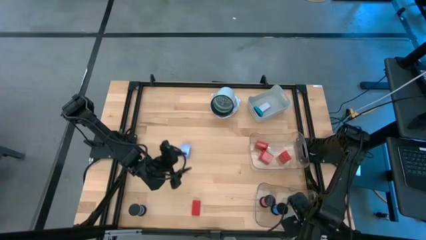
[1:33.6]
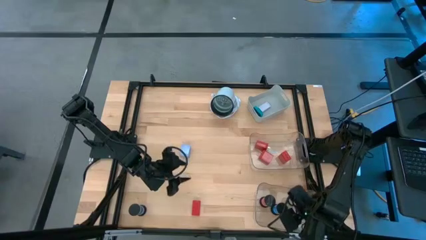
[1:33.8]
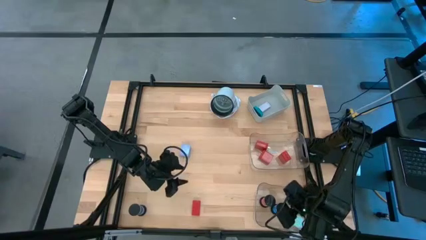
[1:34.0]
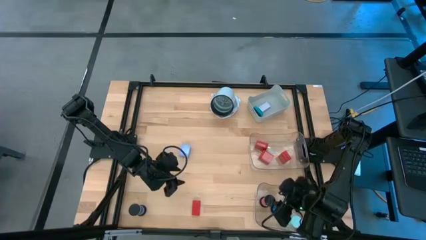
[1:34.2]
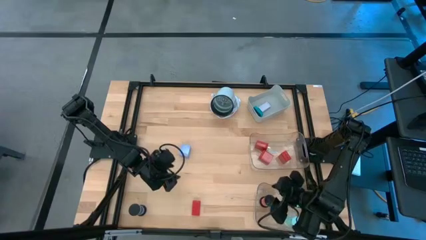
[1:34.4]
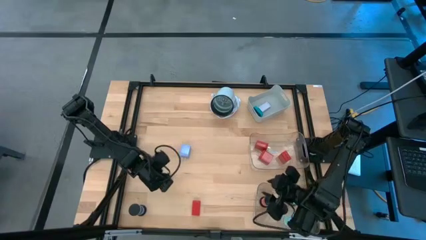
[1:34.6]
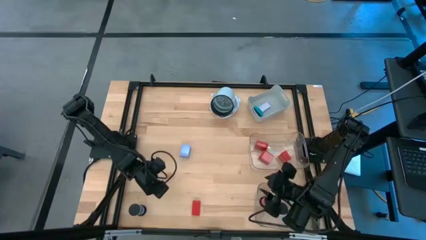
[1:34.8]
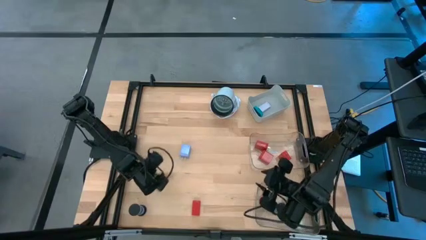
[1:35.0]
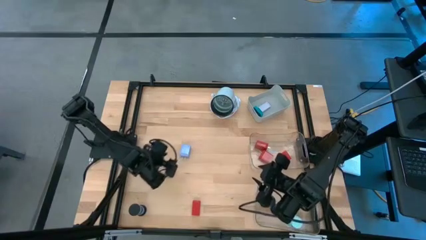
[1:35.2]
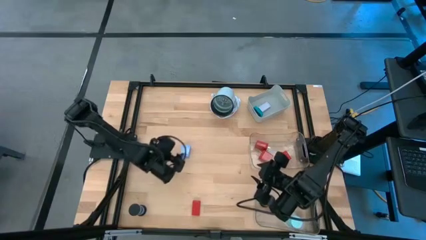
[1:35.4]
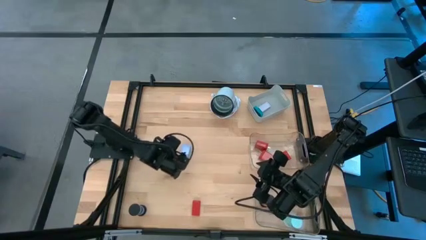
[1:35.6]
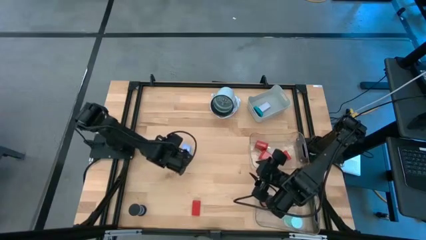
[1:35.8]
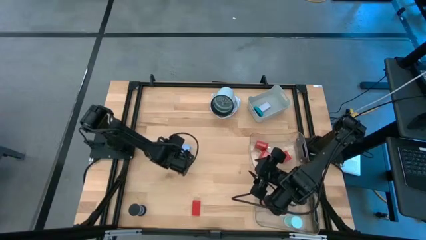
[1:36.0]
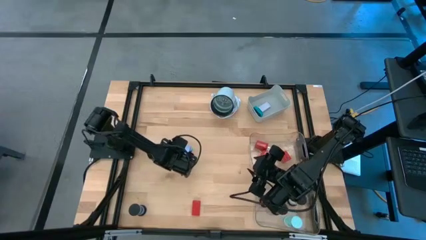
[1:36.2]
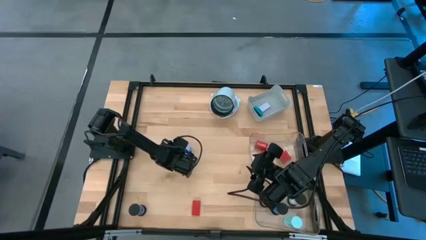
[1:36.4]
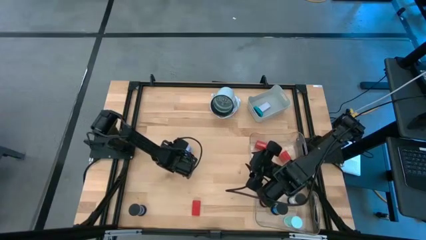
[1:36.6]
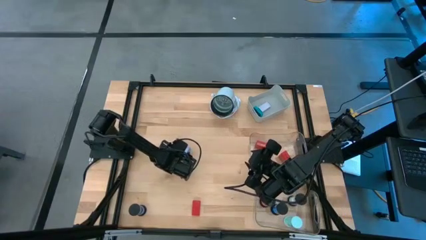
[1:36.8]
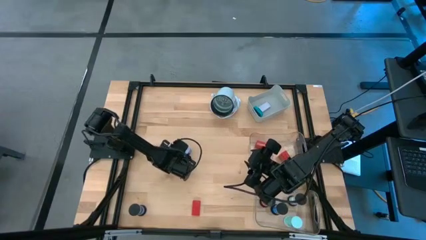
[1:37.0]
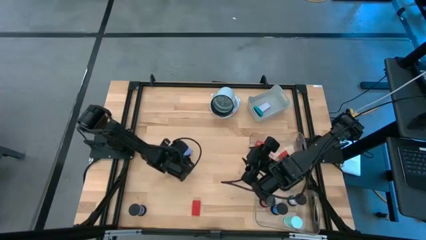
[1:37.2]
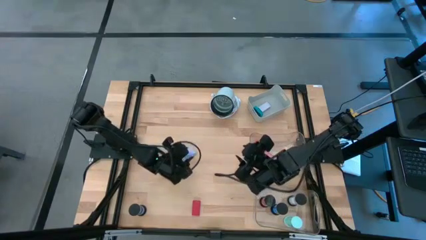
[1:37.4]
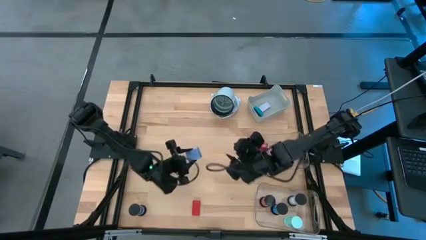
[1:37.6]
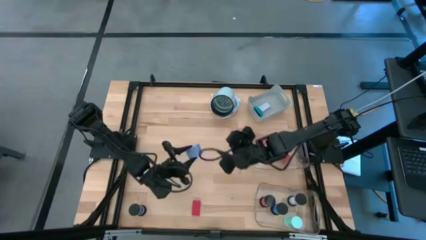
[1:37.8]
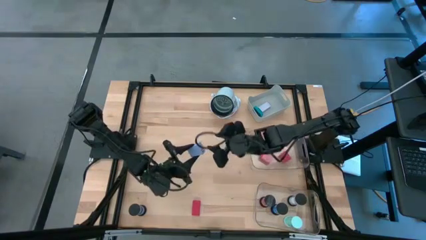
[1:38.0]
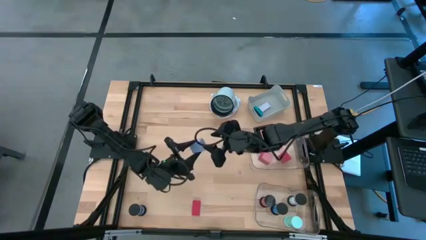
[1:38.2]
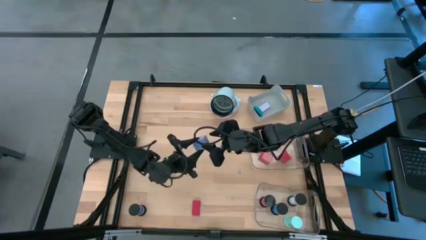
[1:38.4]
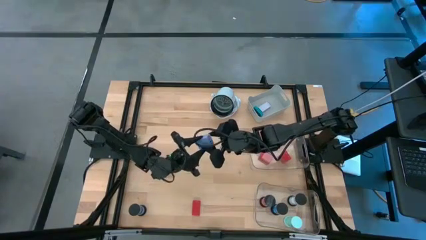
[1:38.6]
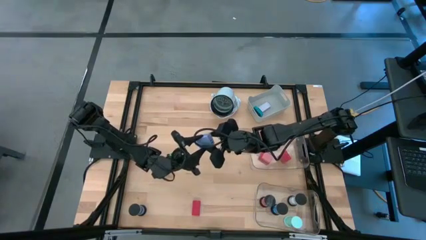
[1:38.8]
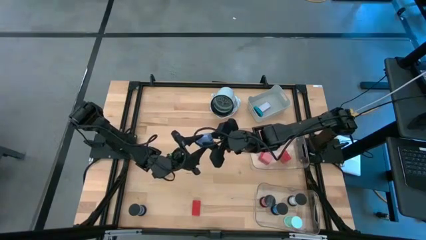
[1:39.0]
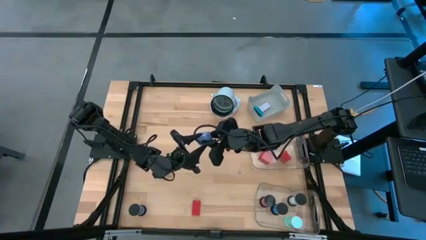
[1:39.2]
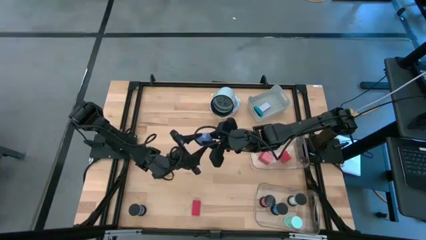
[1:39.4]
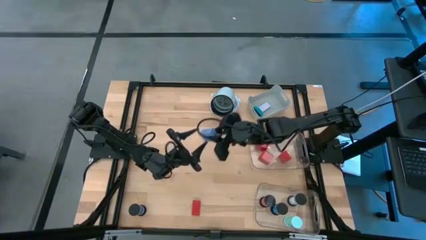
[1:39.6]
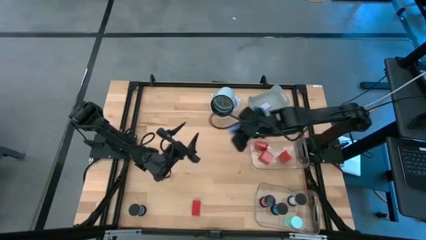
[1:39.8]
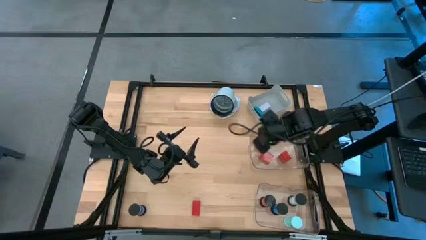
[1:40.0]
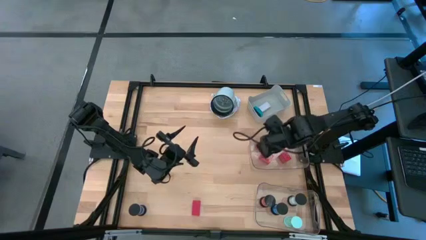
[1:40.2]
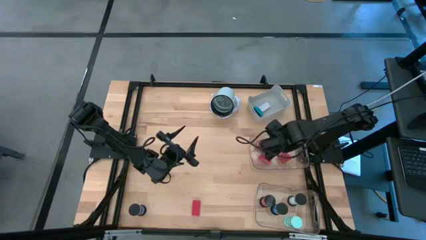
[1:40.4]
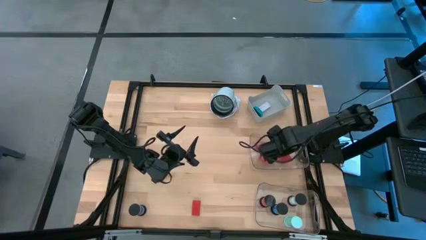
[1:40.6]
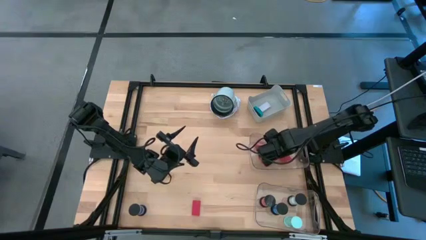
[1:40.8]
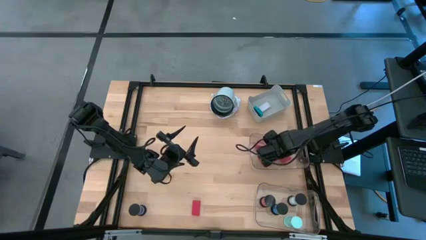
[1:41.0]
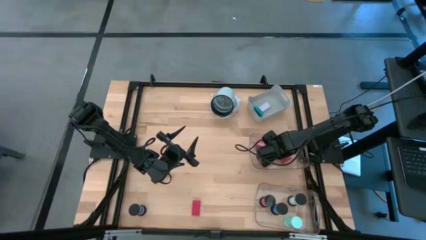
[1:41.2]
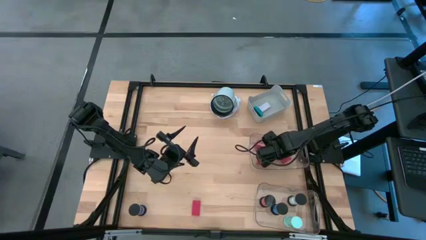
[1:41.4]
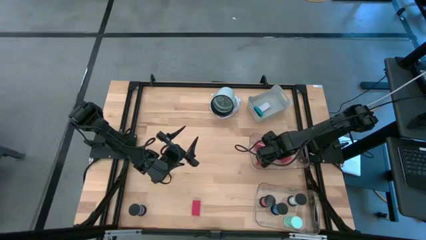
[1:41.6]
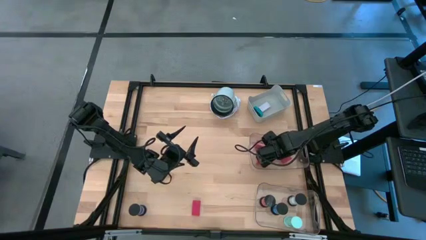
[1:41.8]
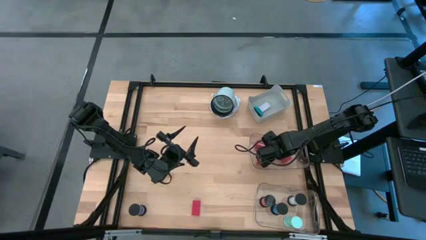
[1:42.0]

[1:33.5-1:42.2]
Task: Pick & Place Office items
Put the blue charger adapter into the top transparent bin
